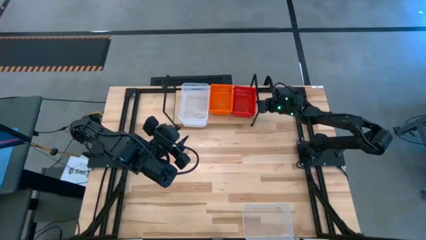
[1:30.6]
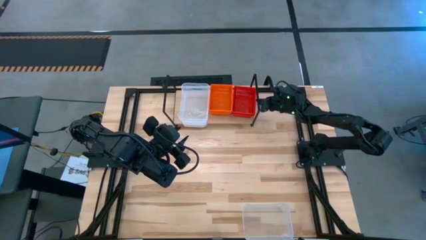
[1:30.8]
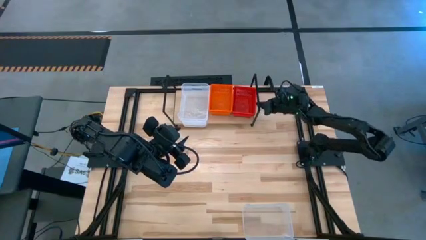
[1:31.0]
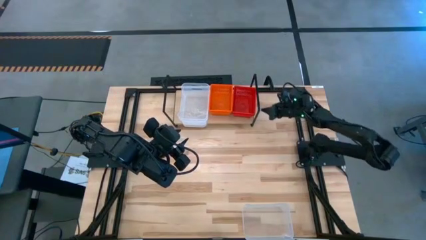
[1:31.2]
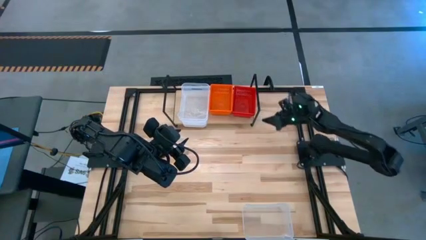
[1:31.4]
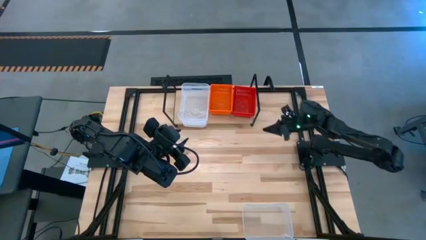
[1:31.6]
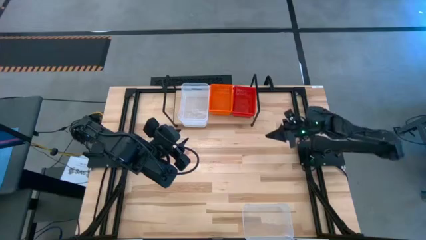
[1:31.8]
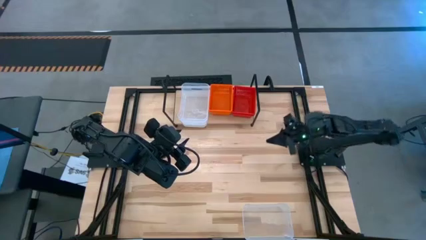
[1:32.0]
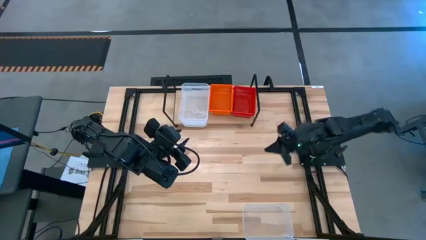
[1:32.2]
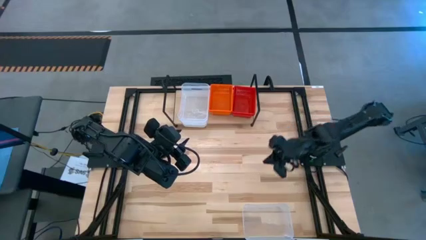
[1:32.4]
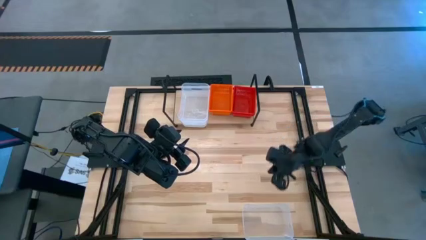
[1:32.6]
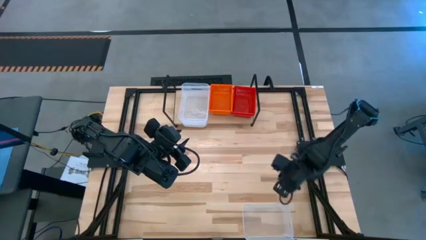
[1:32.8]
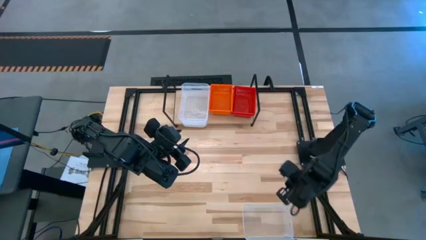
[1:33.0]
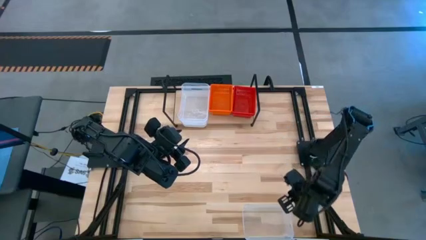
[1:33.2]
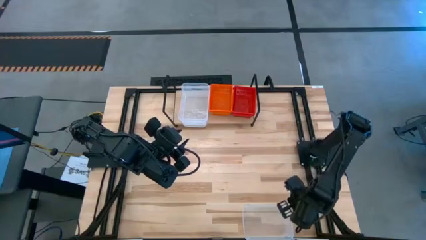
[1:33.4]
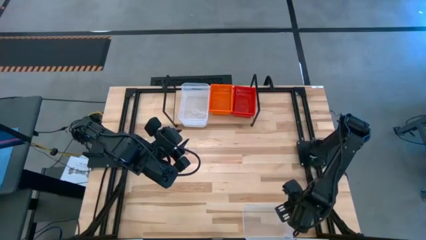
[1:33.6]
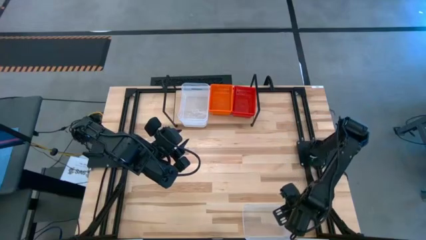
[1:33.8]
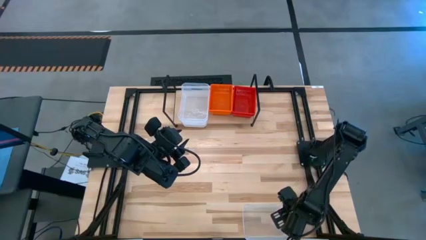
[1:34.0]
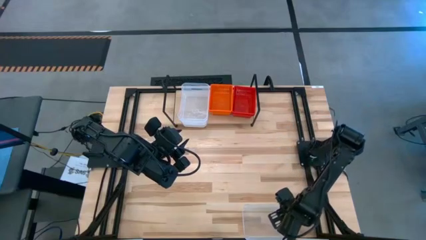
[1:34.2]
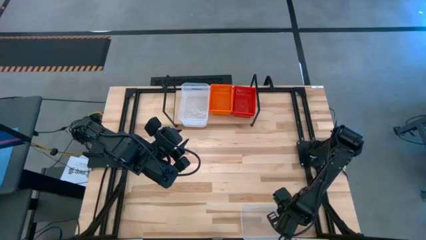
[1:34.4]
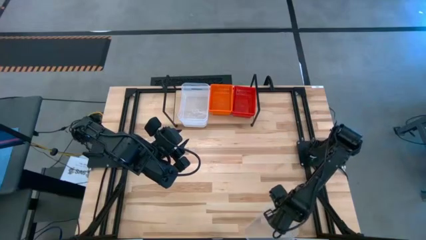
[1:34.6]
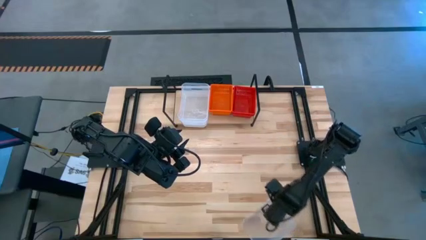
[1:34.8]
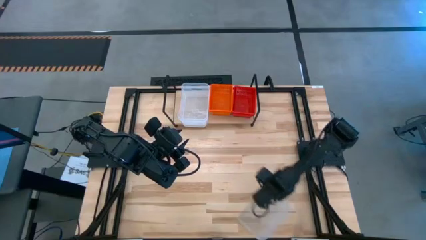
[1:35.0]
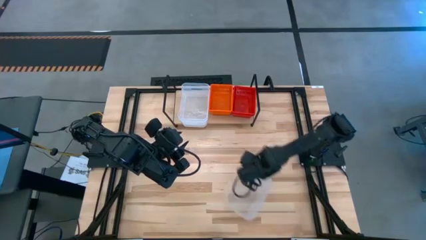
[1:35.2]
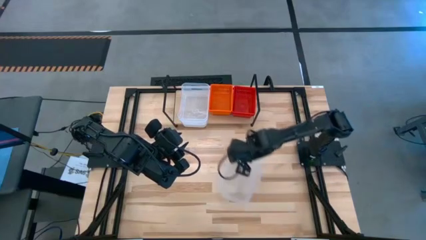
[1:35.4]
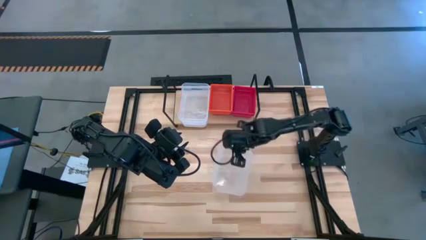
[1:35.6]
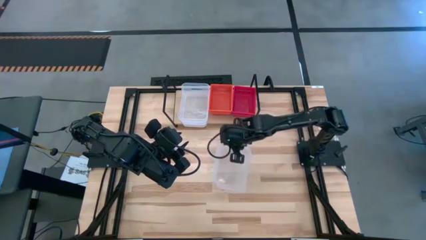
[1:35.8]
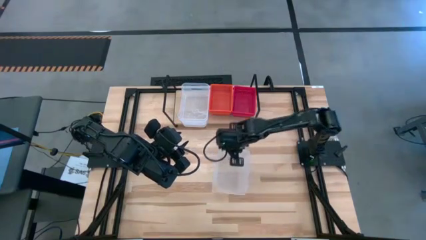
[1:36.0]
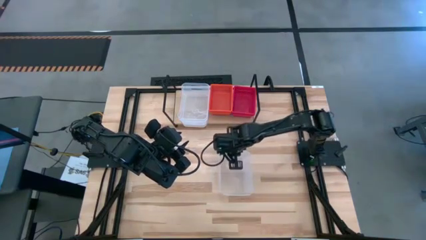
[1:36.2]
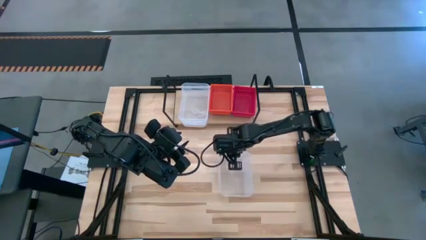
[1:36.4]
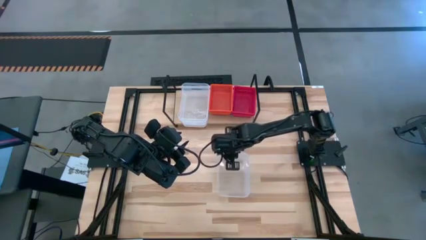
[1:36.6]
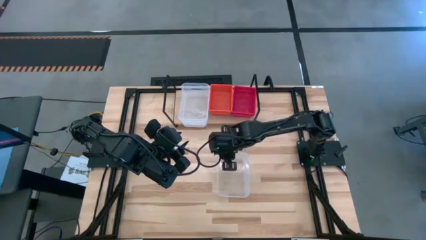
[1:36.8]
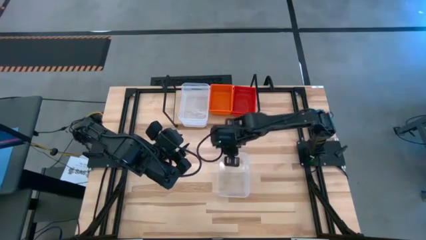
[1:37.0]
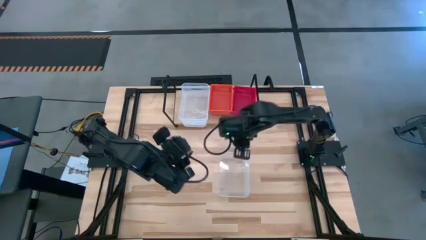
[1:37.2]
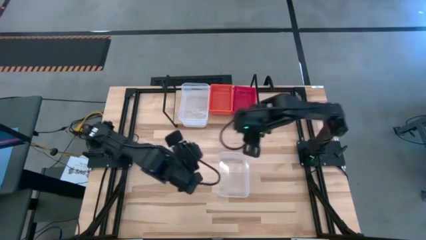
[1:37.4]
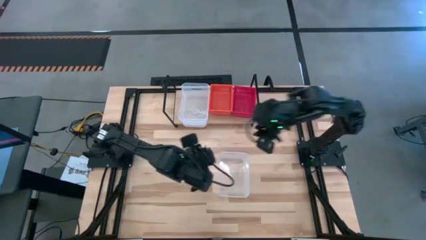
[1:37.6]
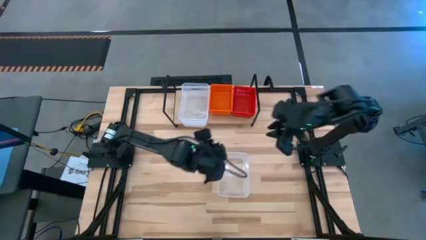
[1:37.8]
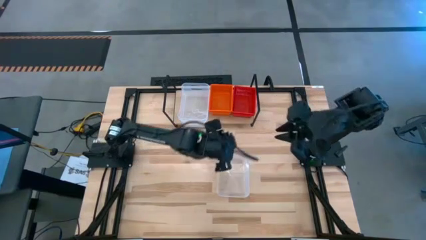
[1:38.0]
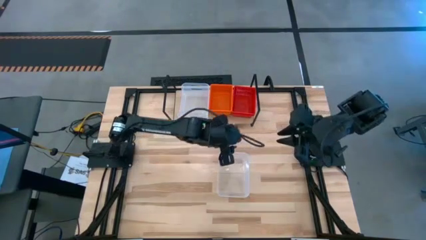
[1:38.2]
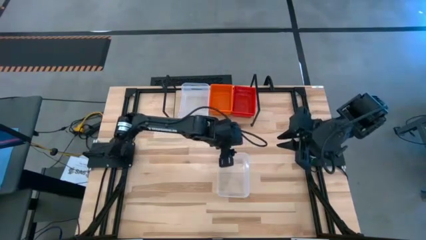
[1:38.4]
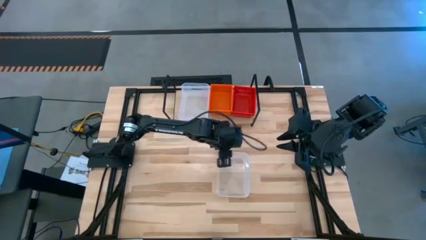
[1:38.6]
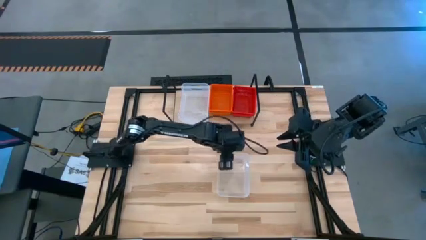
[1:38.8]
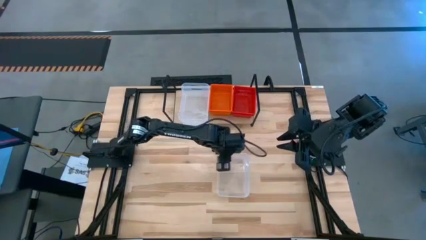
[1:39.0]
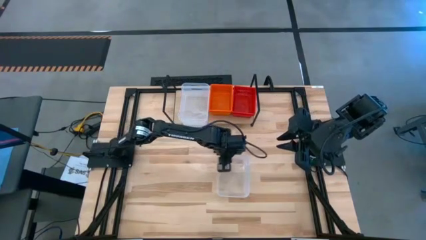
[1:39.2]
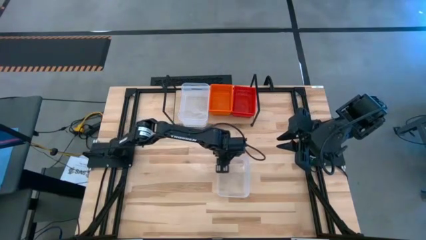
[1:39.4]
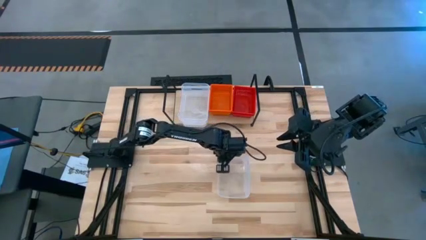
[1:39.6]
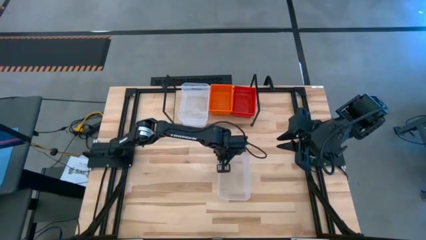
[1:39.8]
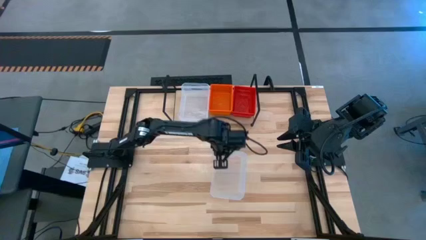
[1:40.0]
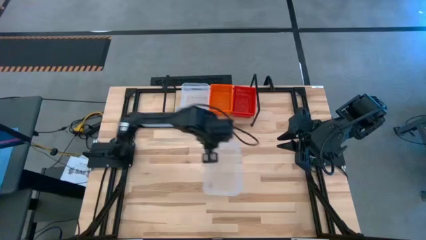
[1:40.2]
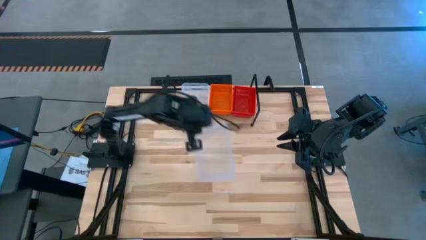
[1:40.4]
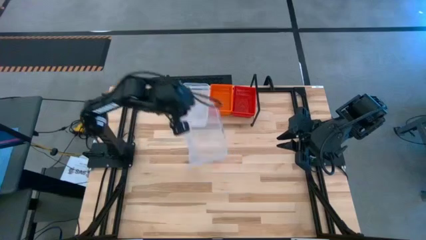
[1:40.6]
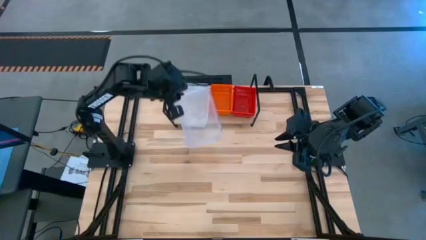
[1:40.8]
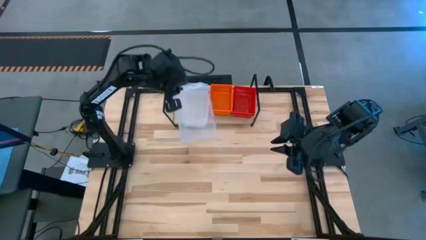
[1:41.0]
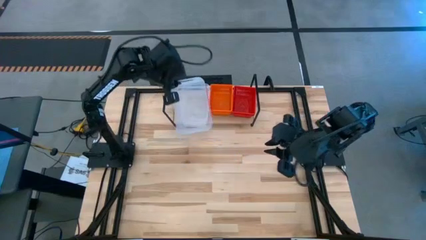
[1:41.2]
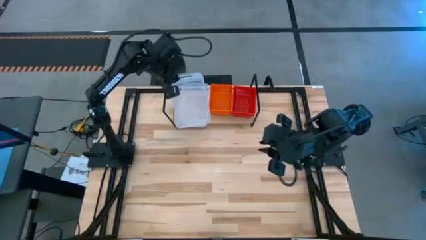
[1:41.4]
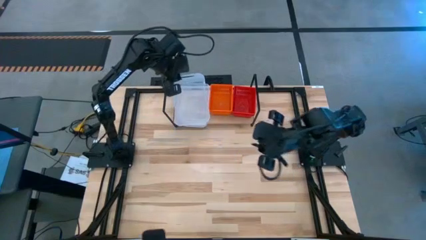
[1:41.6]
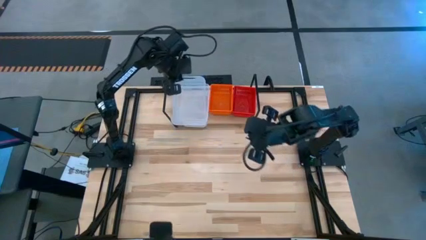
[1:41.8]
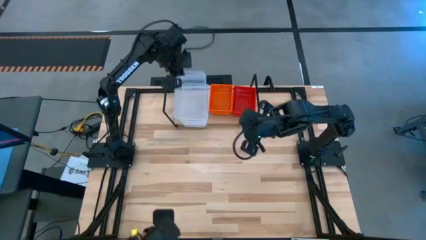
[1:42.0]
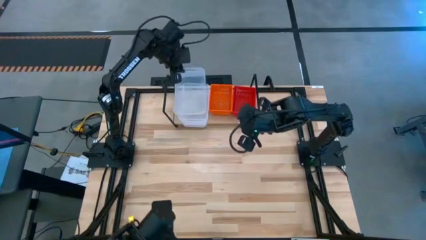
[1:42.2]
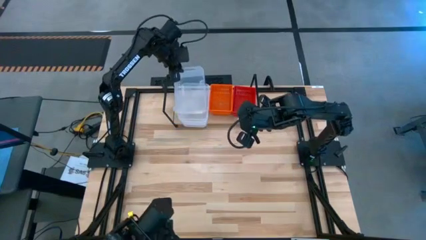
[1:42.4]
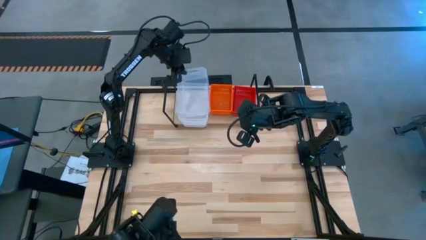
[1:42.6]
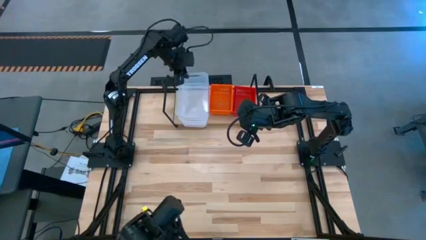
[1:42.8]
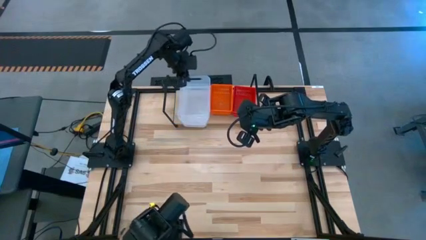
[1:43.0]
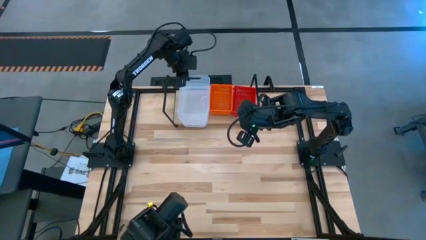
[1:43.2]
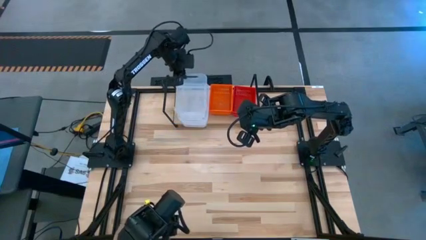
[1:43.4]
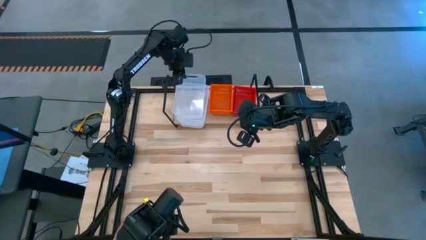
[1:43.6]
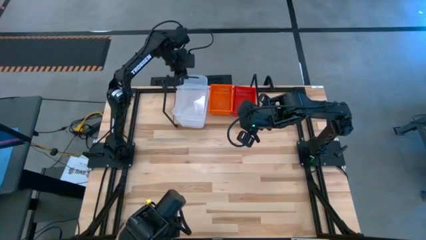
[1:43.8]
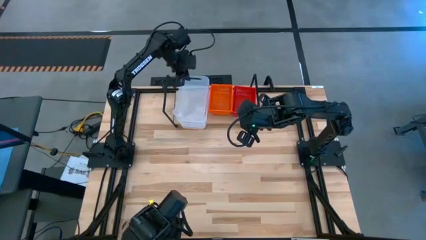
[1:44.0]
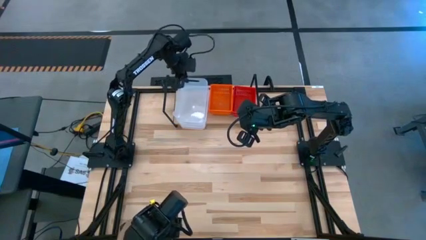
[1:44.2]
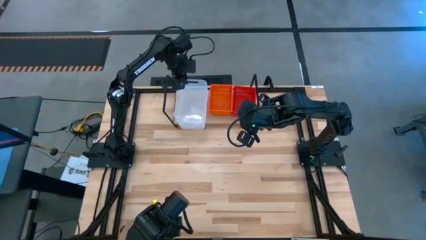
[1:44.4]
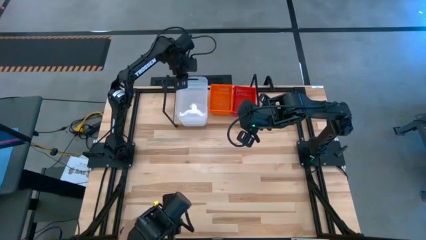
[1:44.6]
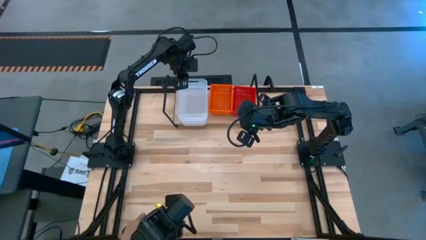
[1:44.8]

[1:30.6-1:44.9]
Task: Stack baskets on shelf by color
Stack the transparent bin on top of the transparent bins on the shelf

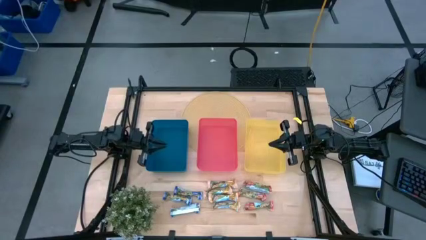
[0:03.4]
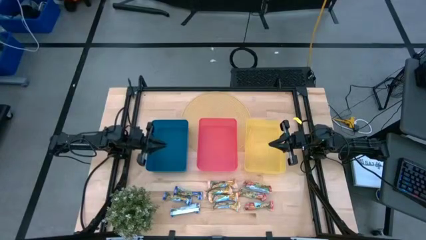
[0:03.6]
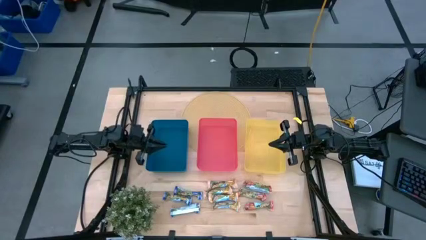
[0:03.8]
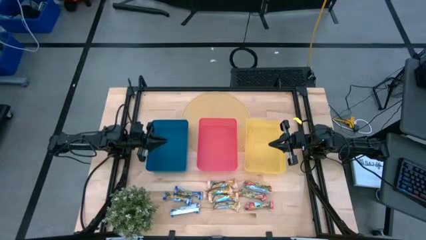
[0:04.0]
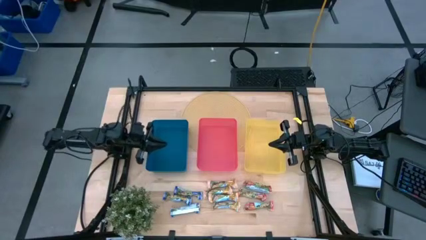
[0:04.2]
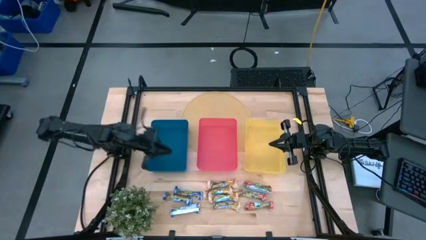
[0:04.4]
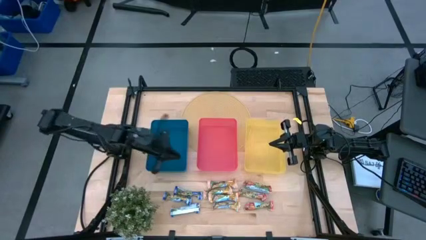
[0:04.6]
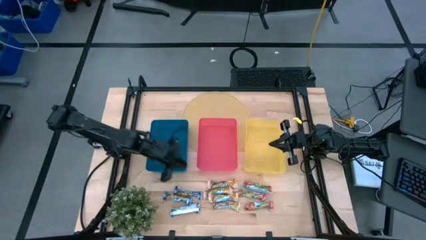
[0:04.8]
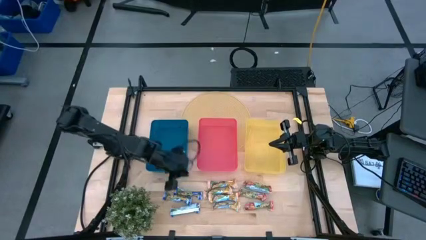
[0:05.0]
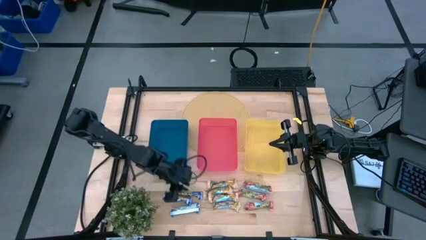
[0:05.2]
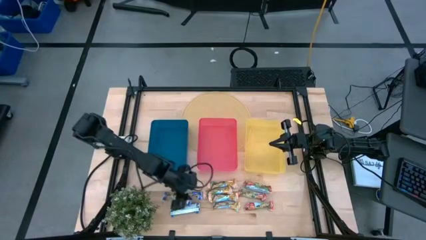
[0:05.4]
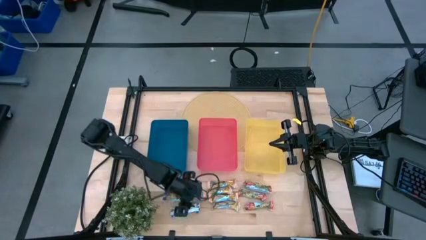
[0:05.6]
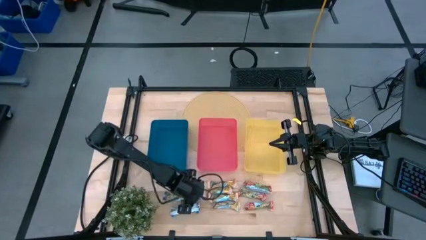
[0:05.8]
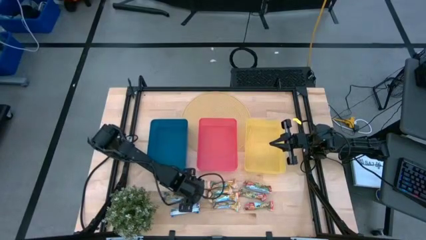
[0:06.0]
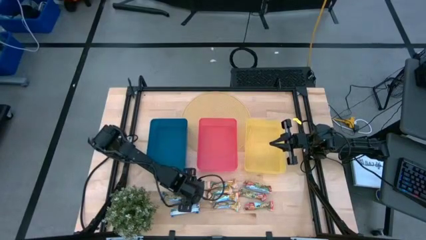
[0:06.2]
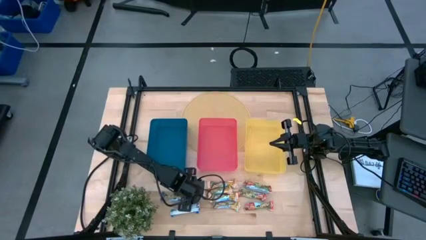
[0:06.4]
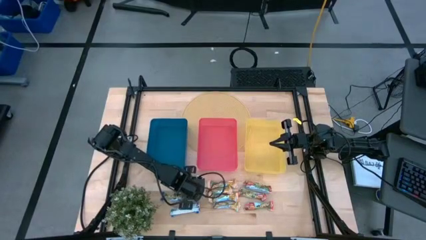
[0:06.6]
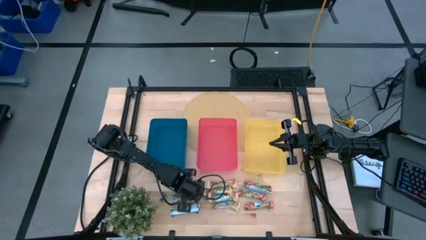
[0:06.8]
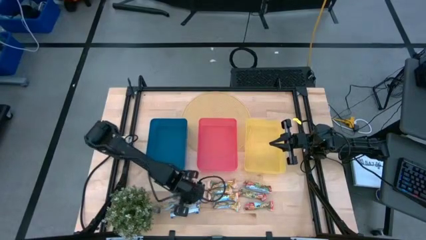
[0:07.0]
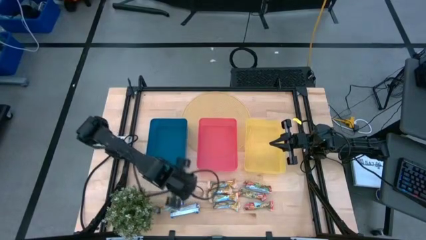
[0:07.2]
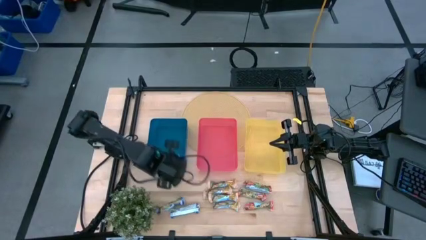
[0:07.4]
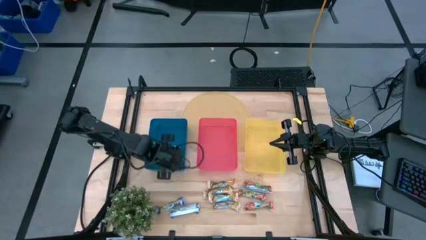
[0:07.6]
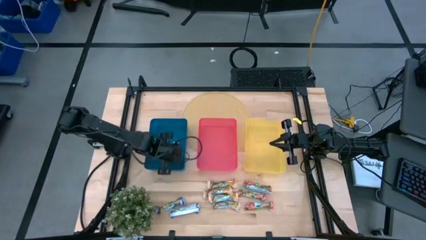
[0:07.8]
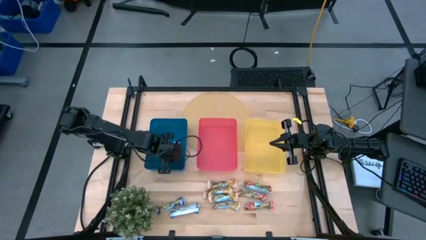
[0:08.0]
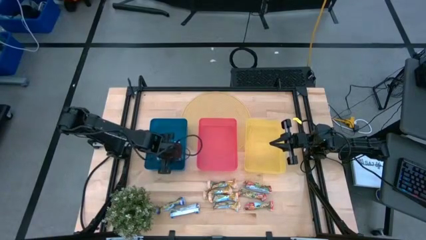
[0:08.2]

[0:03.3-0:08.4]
Task: Pick and place Granola Bars by type
Put the top blue granola bar into the blue bin
